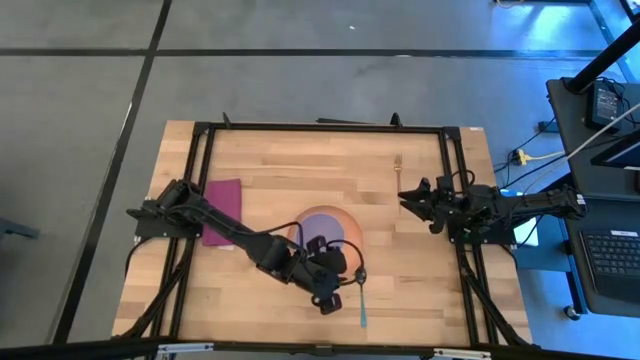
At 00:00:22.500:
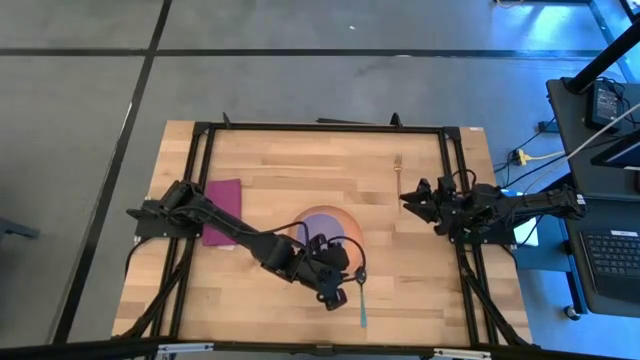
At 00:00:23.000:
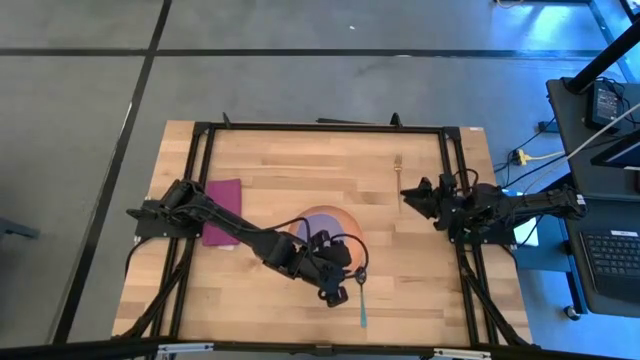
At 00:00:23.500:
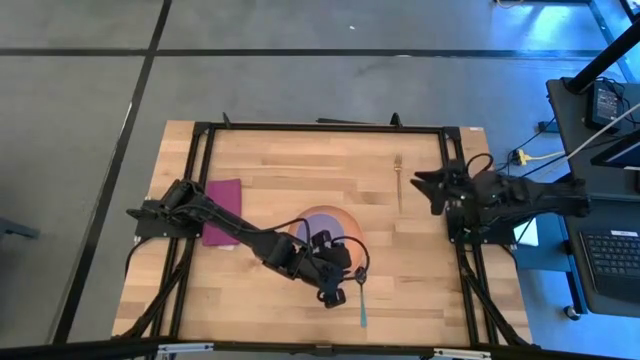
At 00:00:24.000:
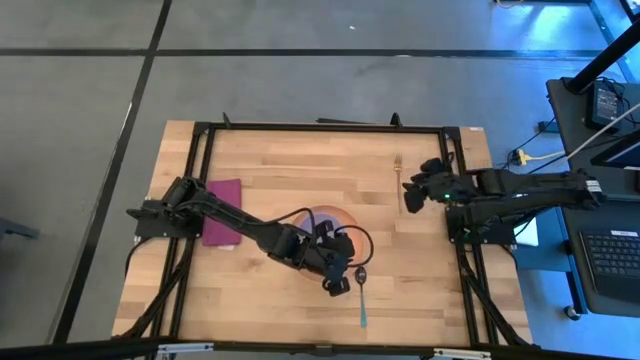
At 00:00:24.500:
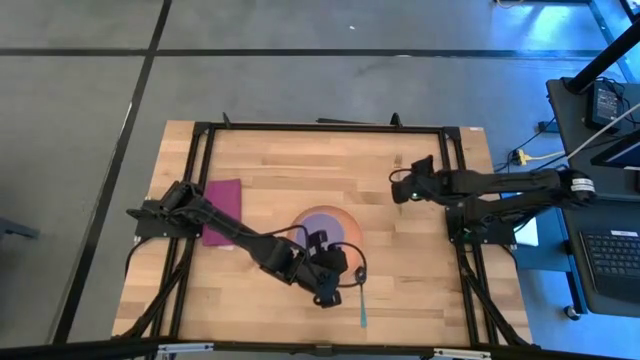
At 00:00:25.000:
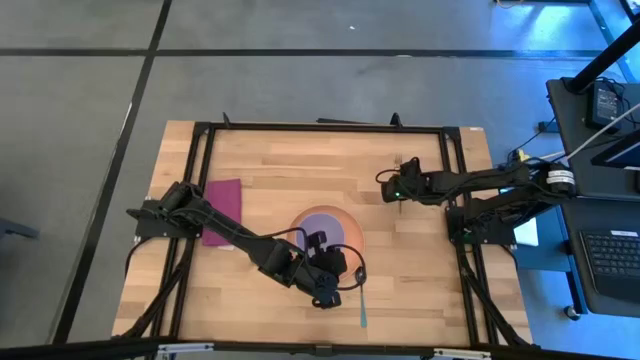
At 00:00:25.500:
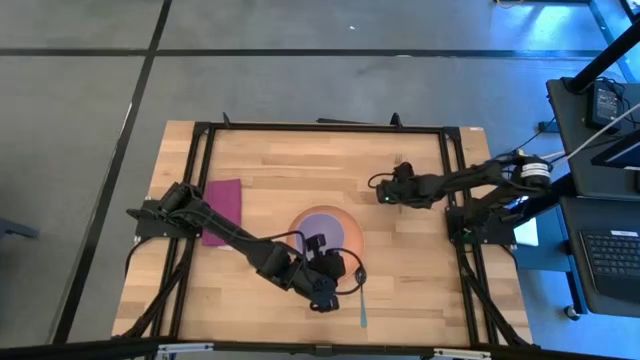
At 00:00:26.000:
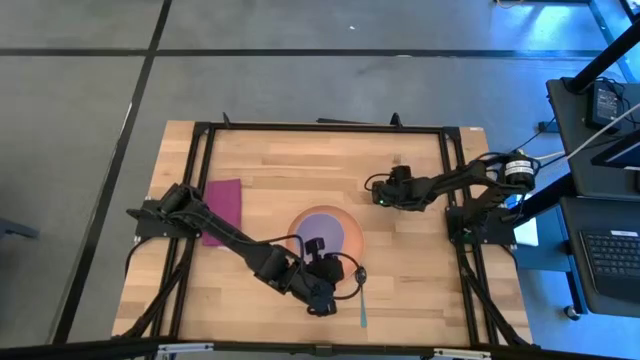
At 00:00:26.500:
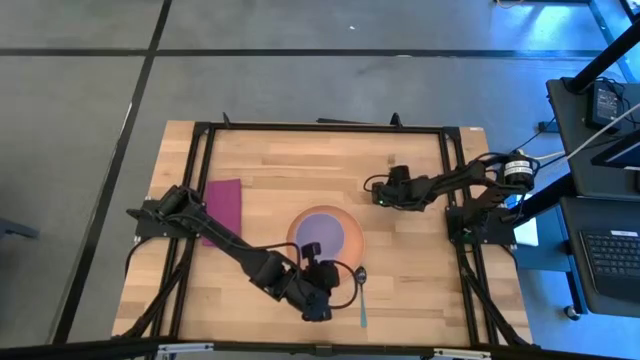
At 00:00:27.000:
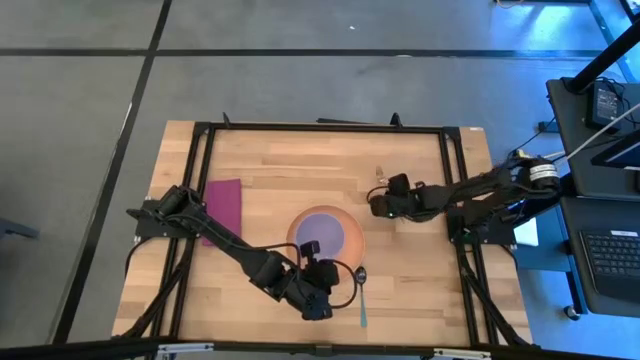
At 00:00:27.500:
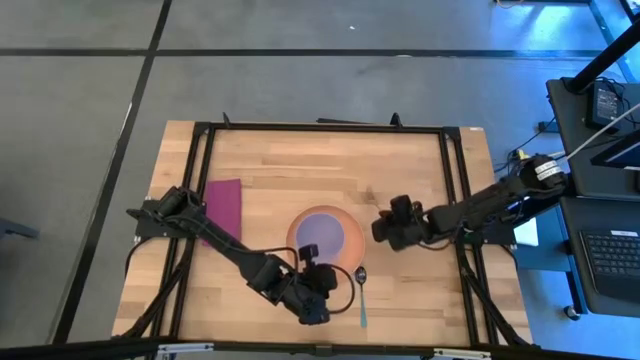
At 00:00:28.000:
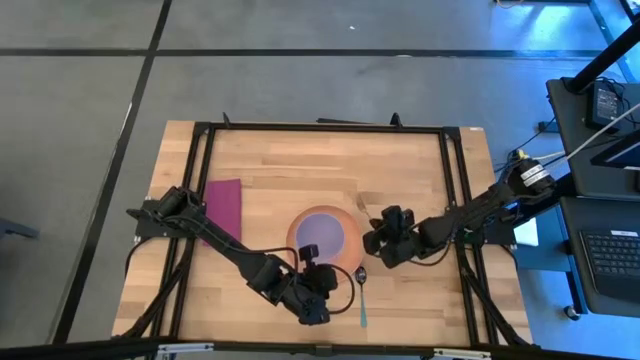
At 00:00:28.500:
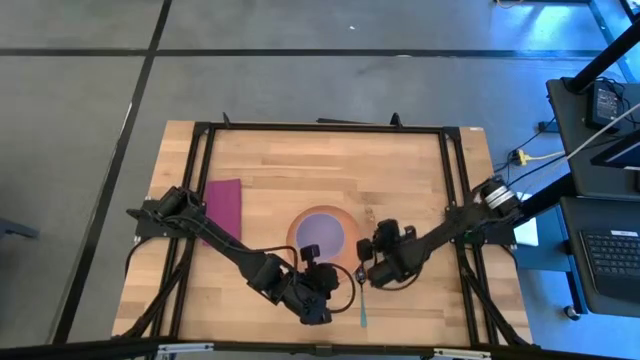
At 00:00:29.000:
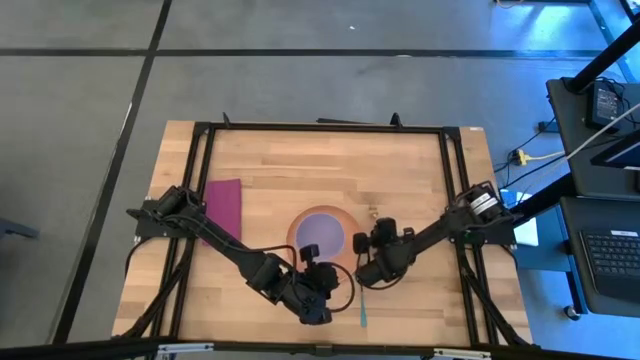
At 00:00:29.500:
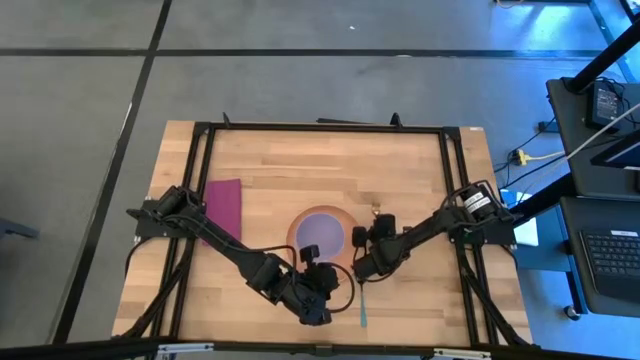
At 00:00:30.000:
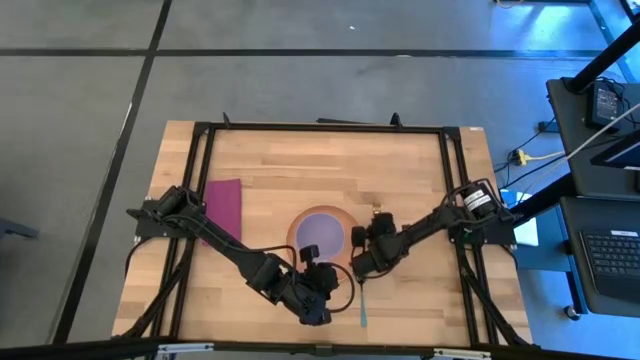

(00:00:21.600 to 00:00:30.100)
Task: Set table place
Put the gold fork on the right side of the plate

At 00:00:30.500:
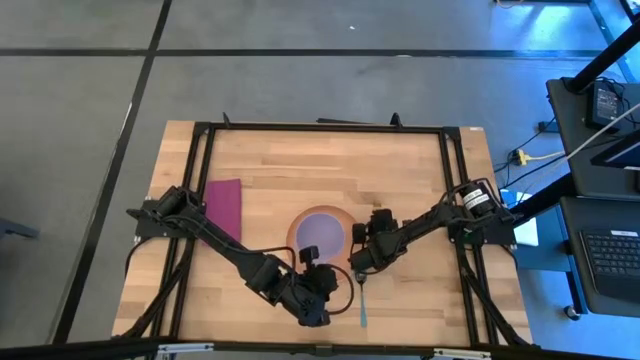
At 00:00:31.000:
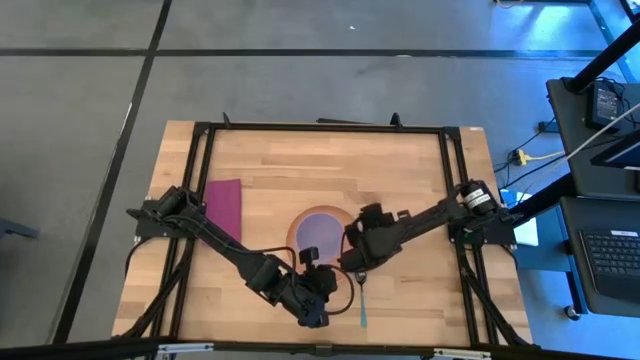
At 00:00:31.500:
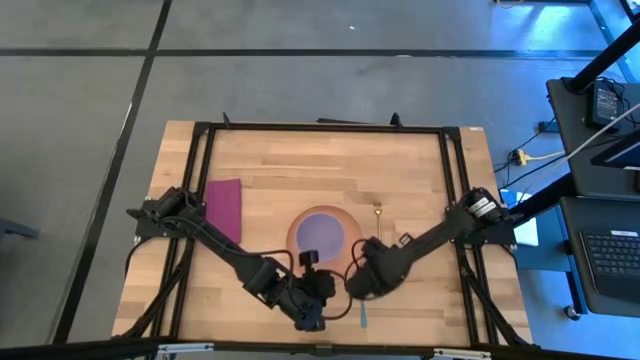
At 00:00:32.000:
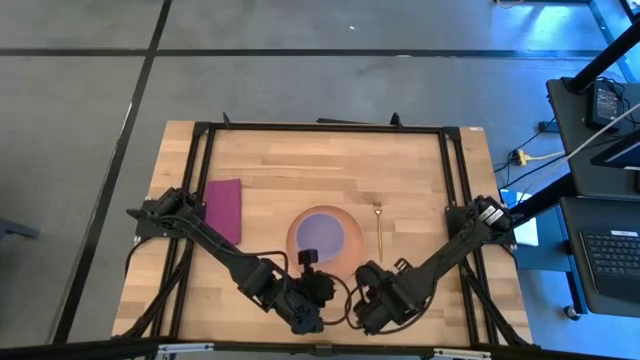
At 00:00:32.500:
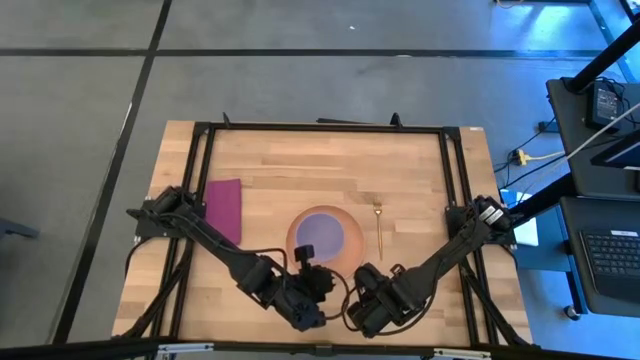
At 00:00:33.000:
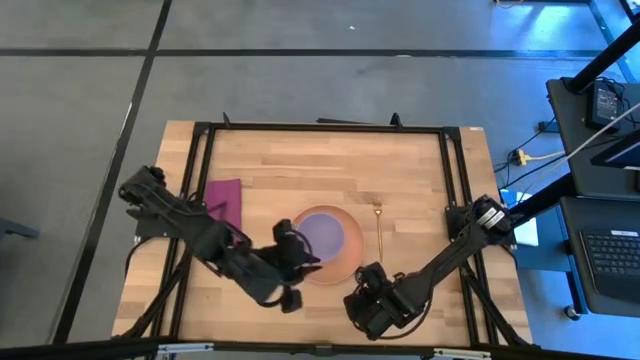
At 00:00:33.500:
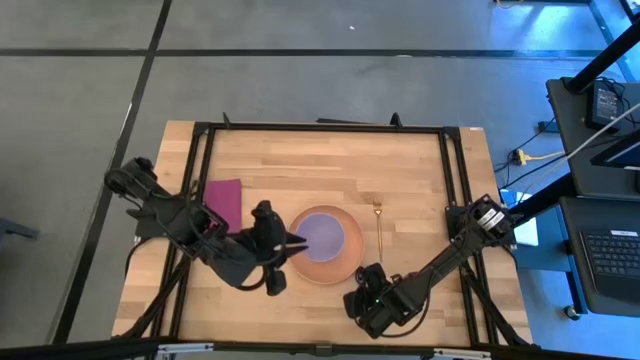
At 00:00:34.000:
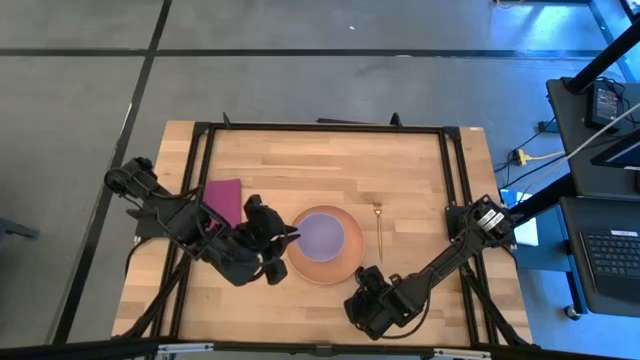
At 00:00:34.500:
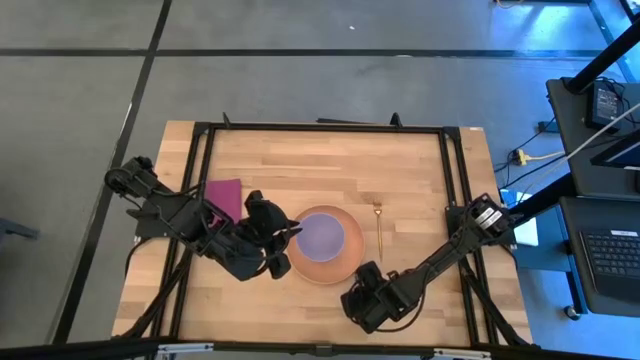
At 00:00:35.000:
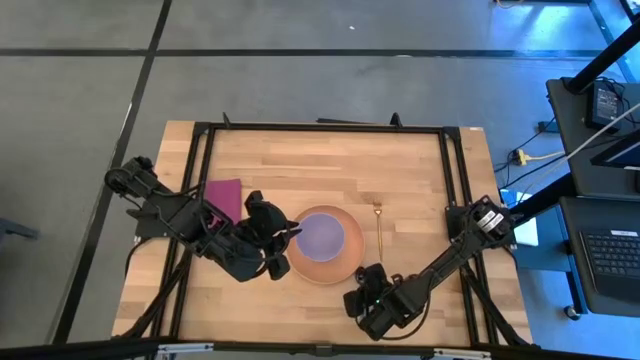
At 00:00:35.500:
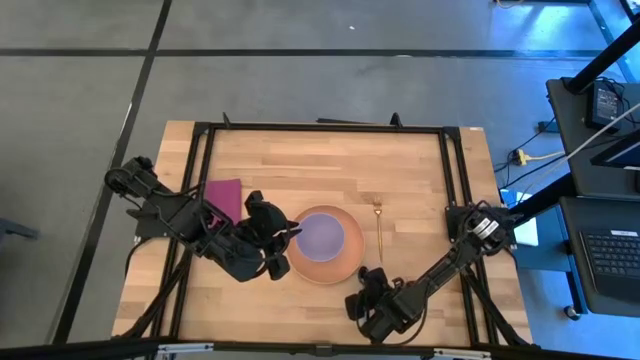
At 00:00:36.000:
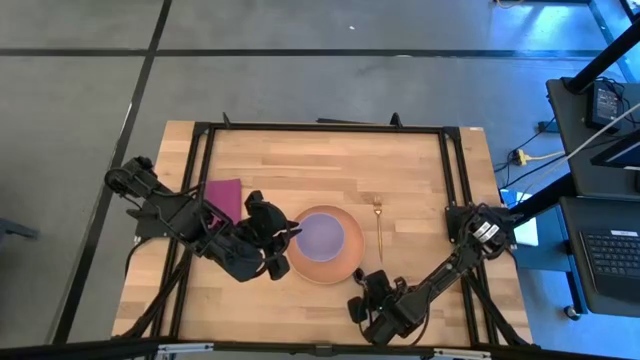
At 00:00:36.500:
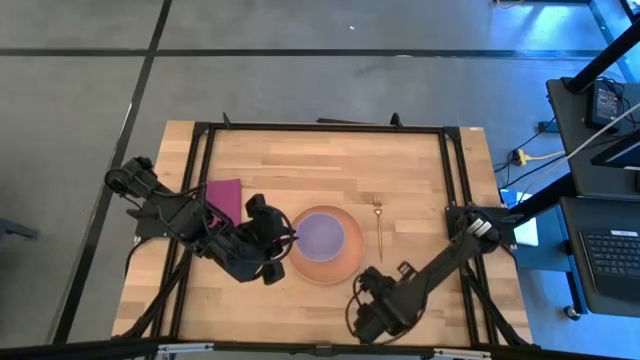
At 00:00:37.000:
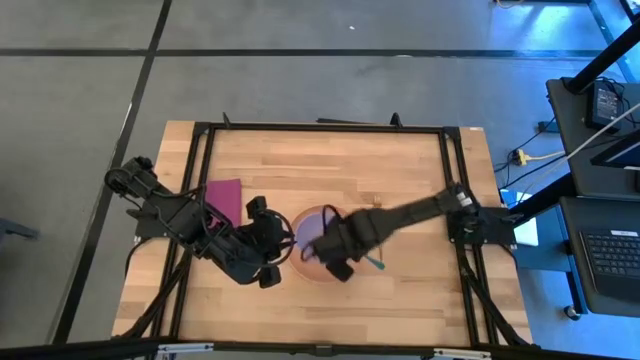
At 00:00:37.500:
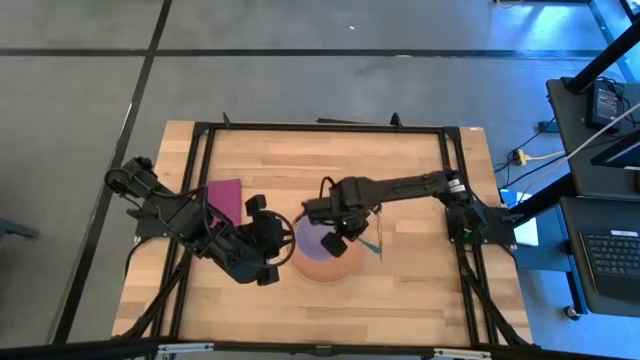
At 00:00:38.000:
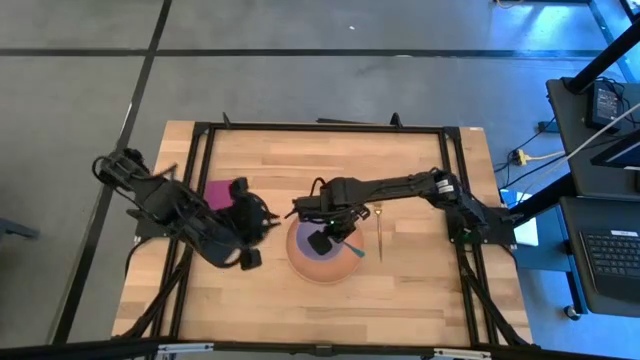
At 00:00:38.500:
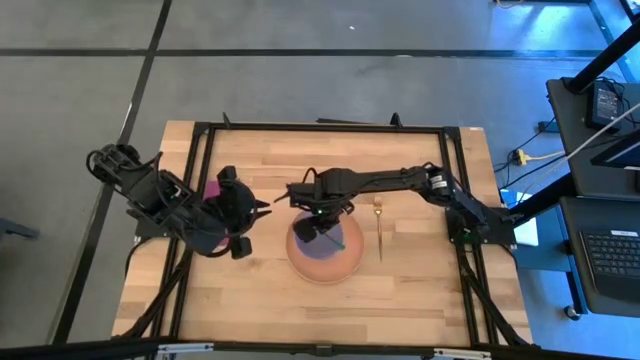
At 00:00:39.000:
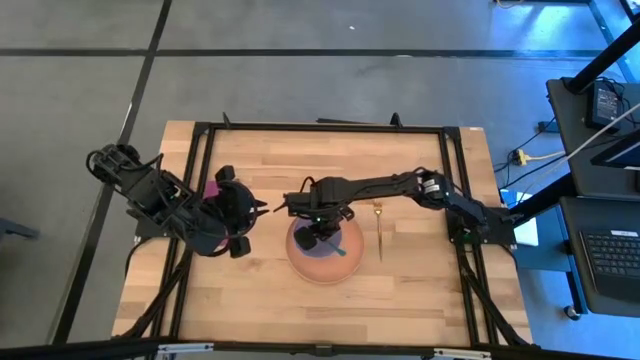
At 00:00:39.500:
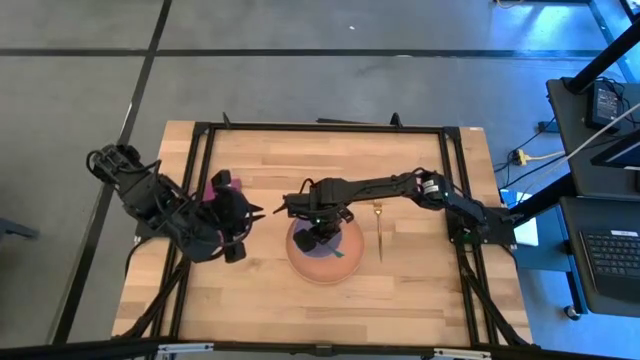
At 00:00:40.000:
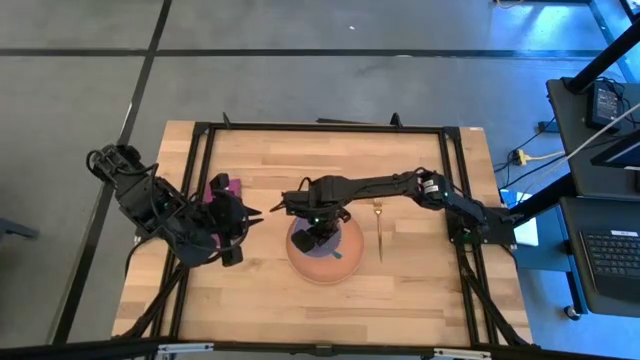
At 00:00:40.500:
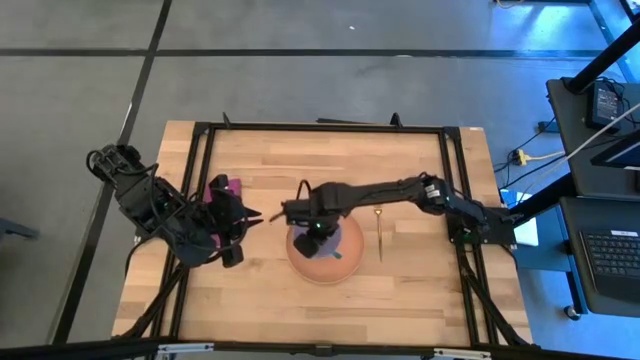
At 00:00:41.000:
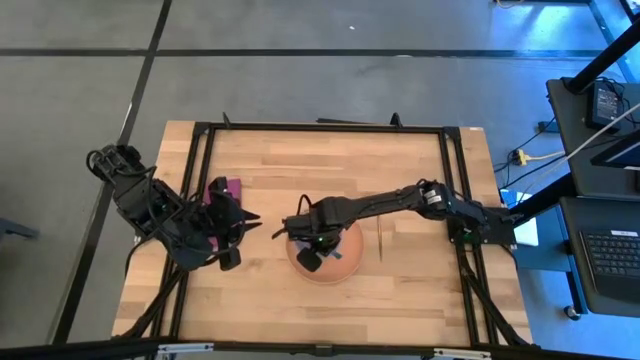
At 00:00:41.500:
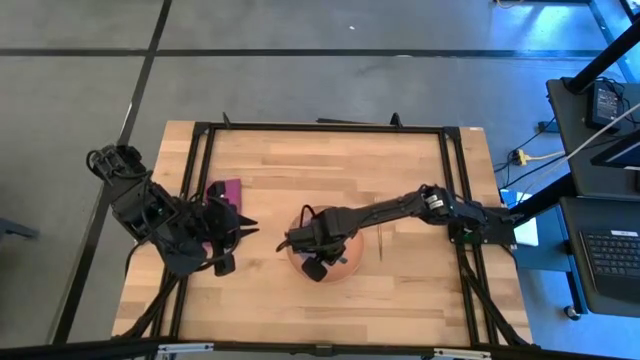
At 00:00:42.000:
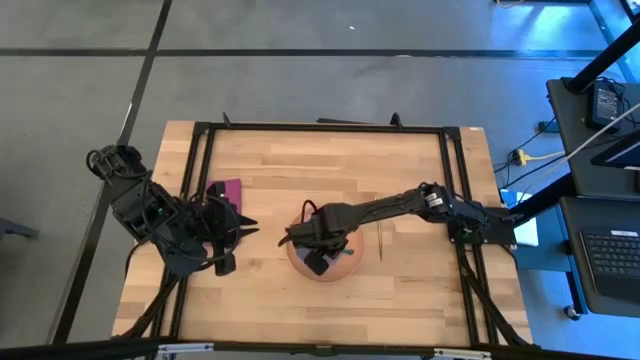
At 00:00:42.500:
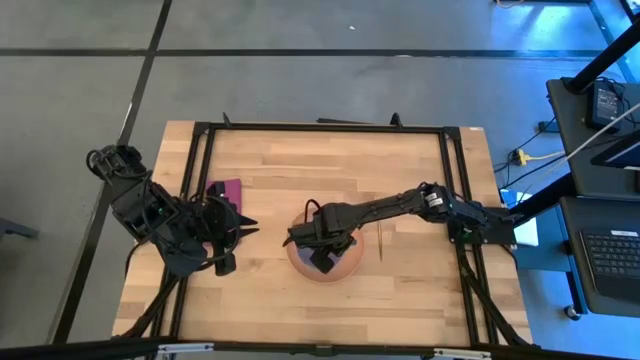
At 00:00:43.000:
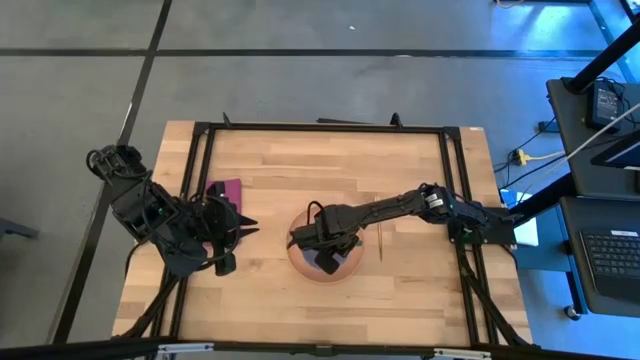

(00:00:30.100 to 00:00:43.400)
Put the blue spoon into the bowl
